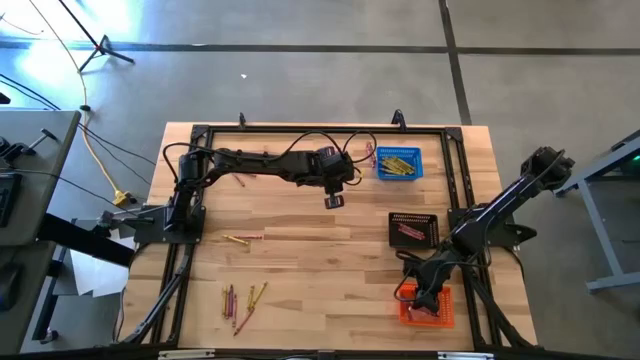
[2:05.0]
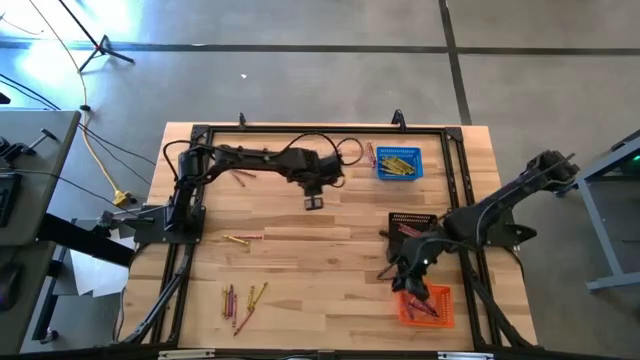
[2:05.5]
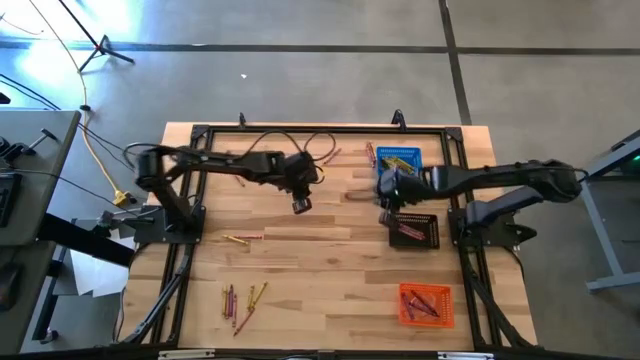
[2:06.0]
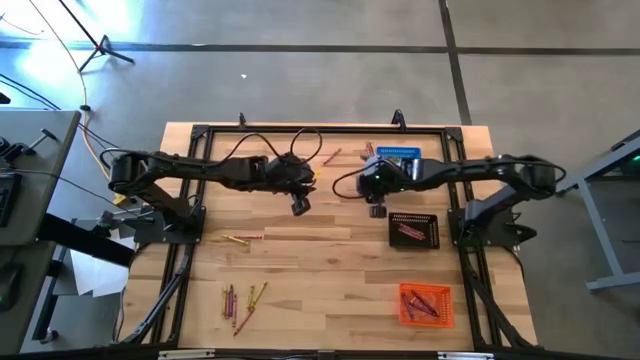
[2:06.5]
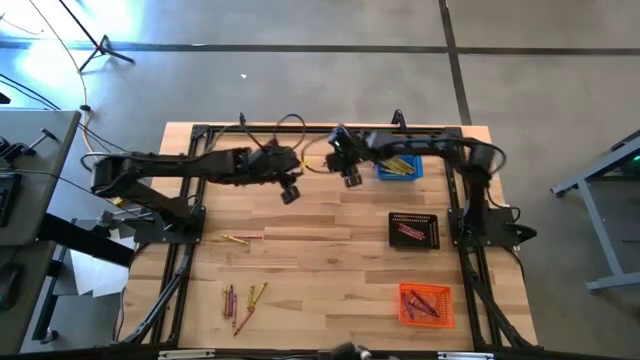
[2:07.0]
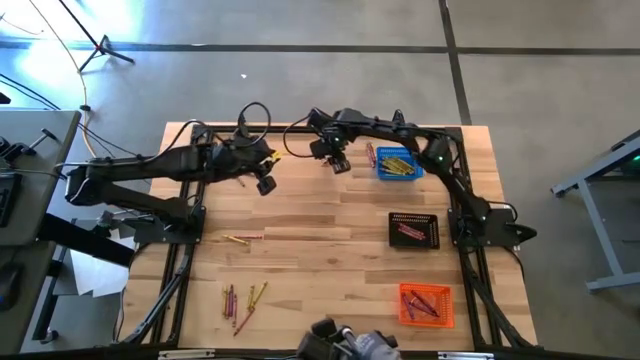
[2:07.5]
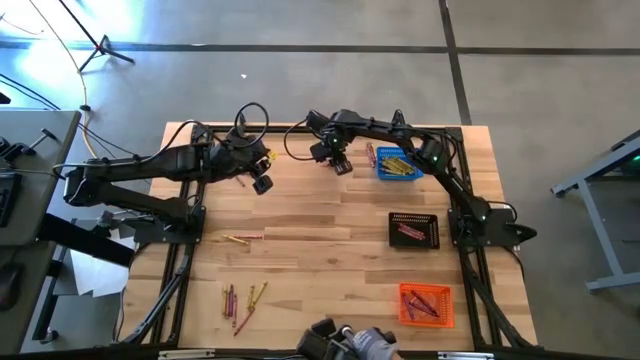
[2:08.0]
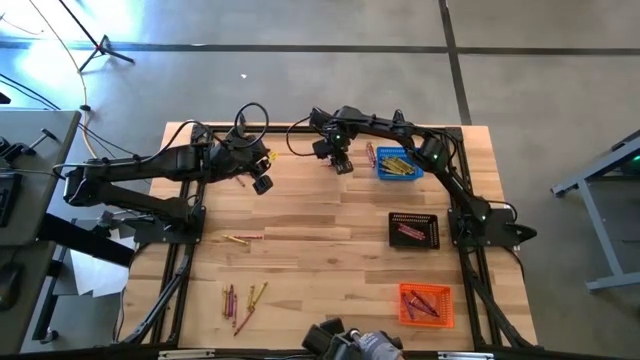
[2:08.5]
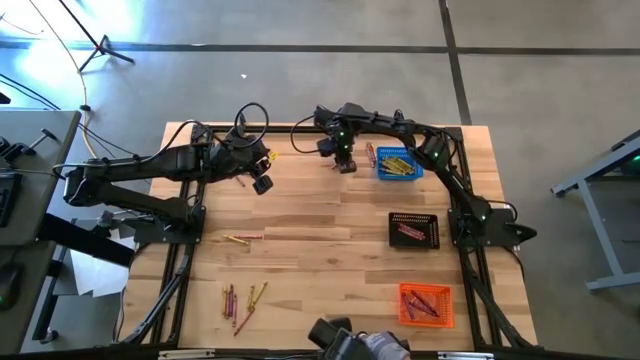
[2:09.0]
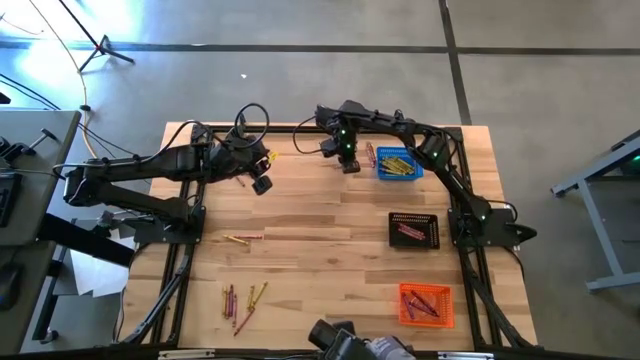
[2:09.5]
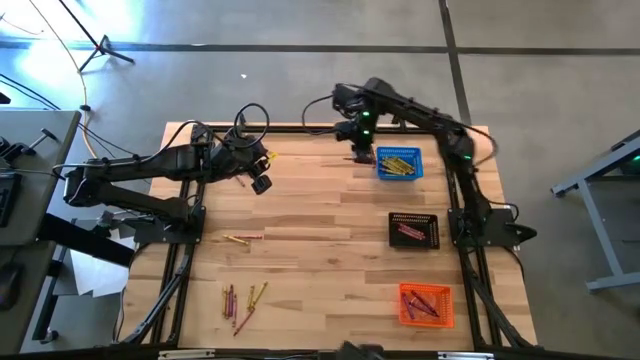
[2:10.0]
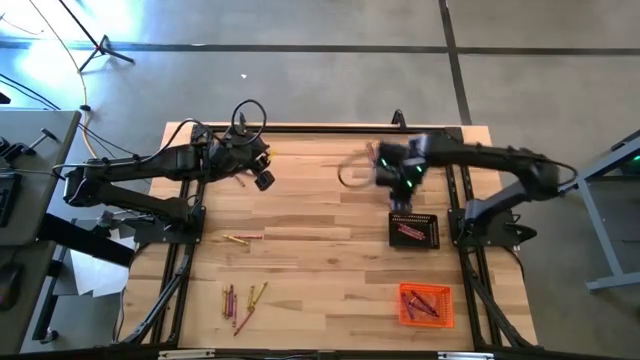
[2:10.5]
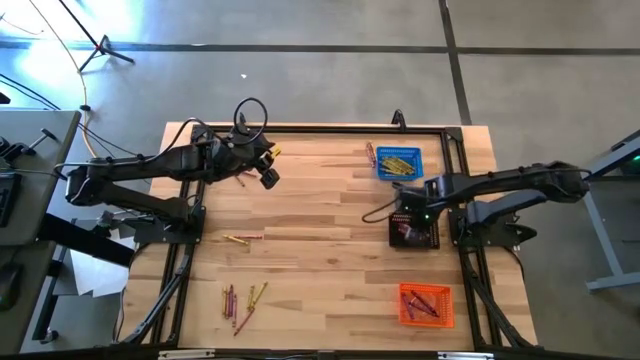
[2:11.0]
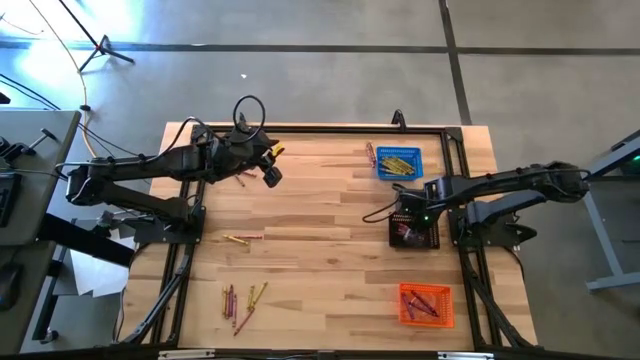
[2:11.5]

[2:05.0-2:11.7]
Task: Sort crayons
Put the red crayon into the black bin

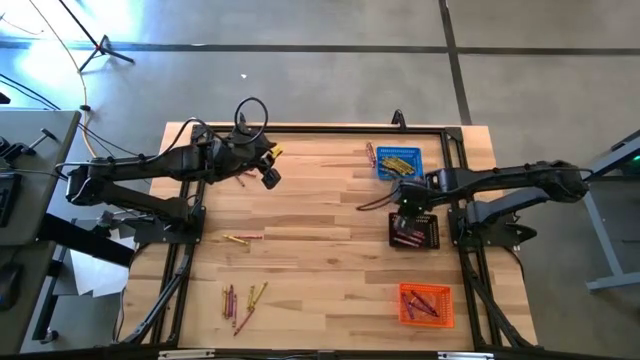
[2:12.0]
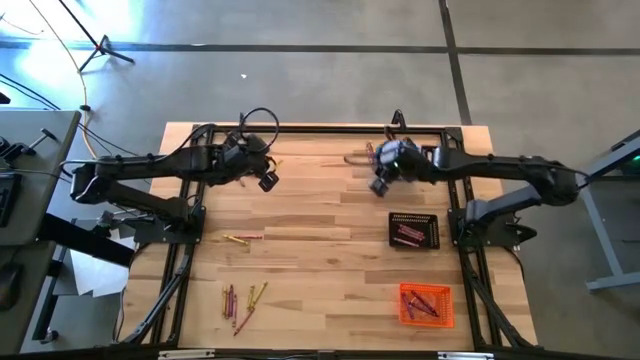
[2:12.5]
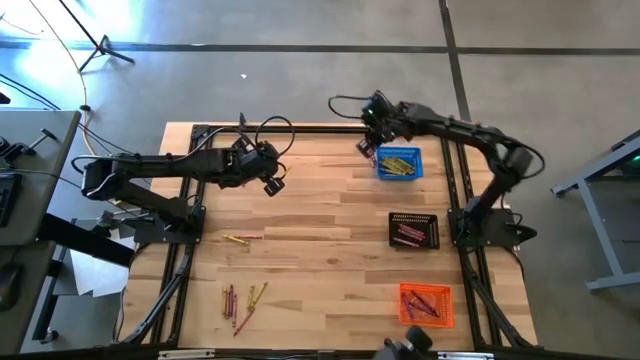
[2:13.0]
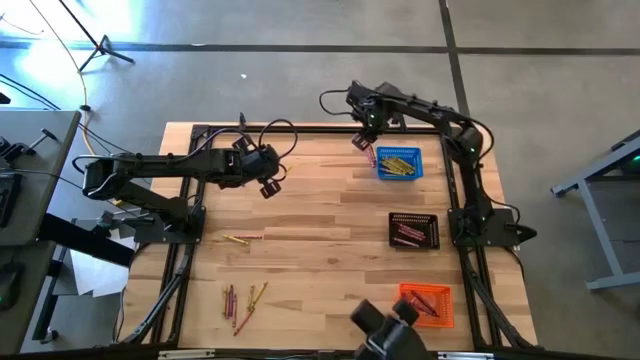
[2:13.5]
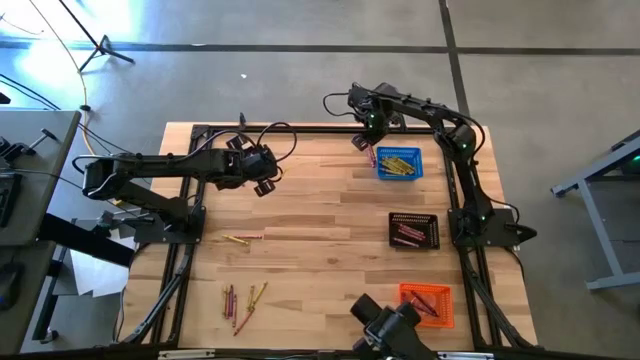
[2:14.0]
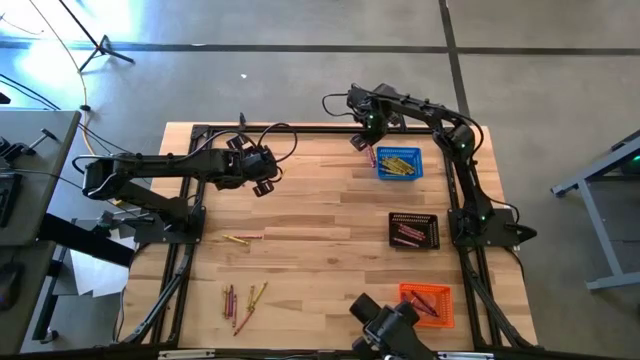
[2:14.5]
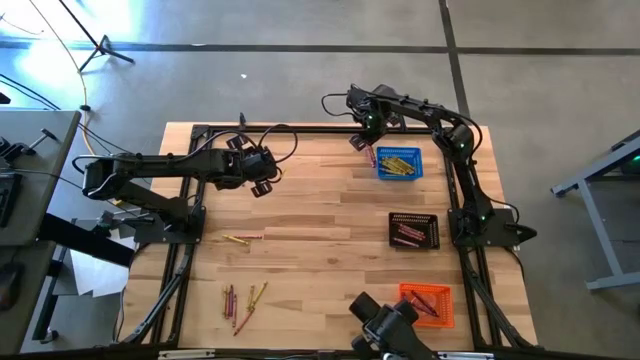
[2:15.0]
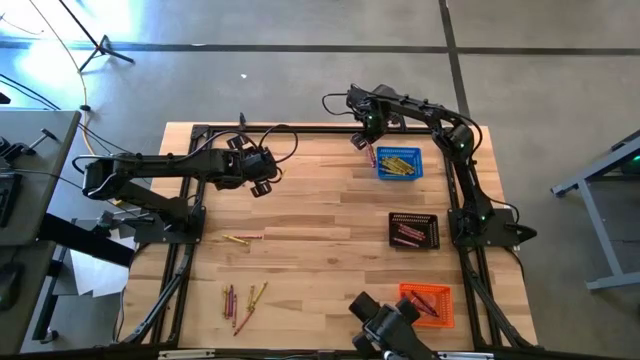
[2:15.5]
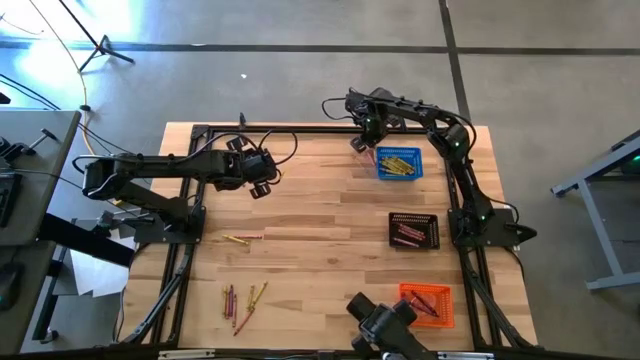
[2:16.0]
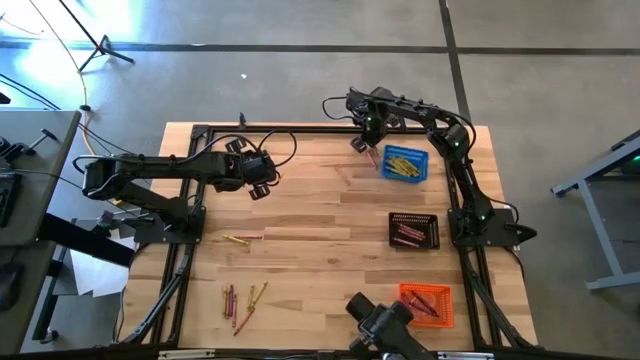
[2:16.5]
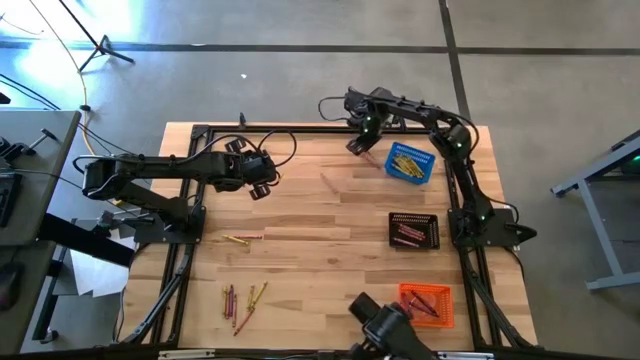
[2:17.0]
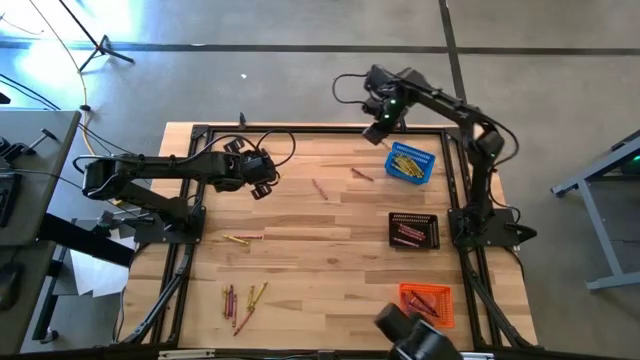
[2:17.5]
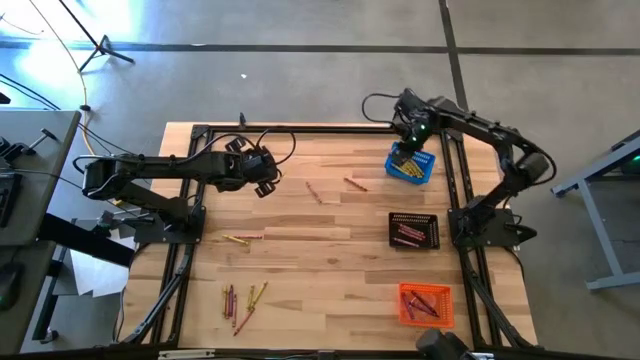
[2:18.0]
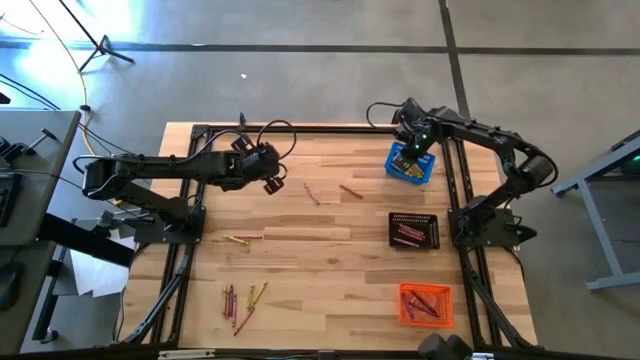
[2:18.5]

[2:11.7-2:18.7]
Put the yellow crayon into the blue bin

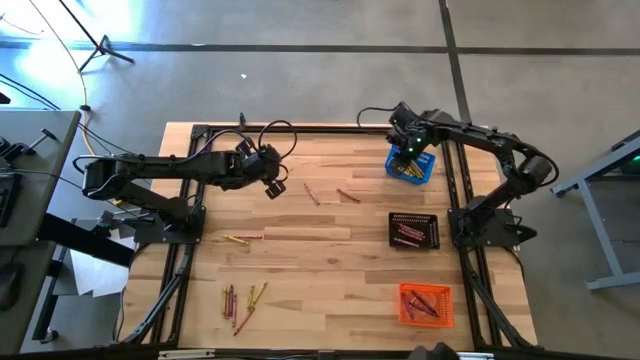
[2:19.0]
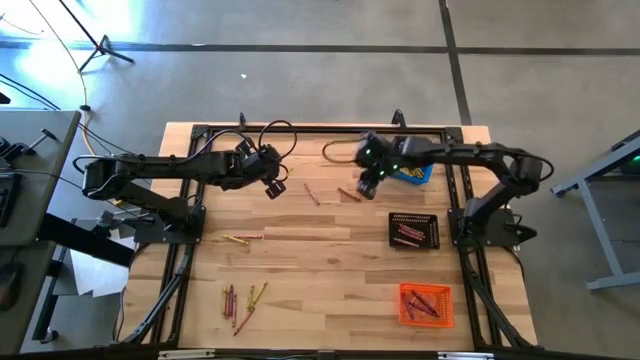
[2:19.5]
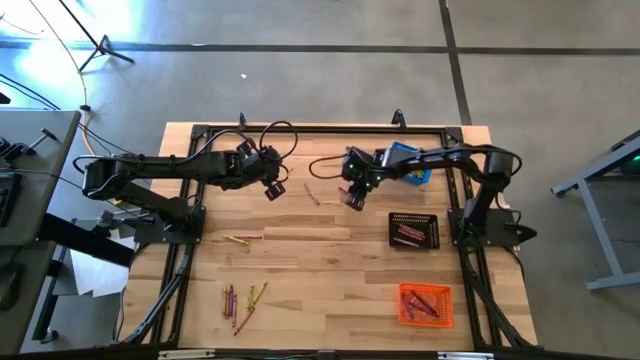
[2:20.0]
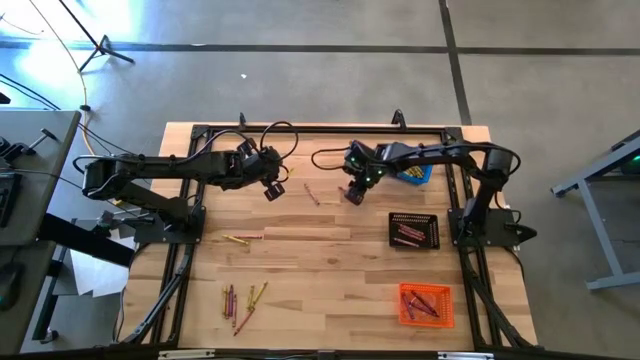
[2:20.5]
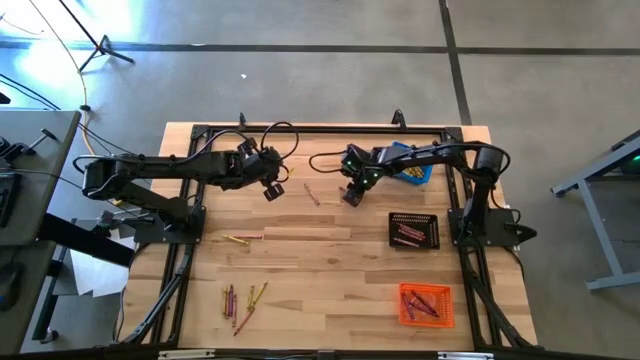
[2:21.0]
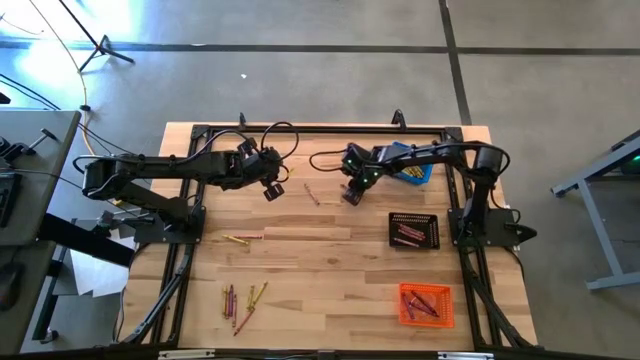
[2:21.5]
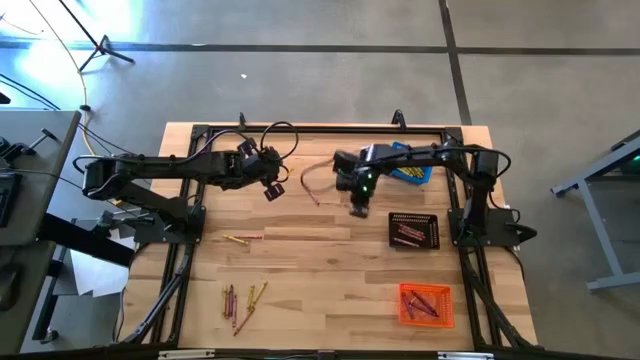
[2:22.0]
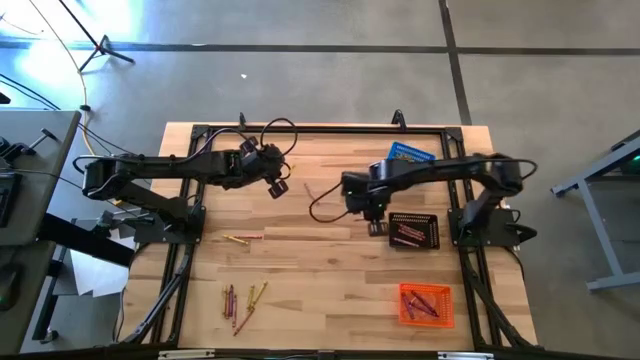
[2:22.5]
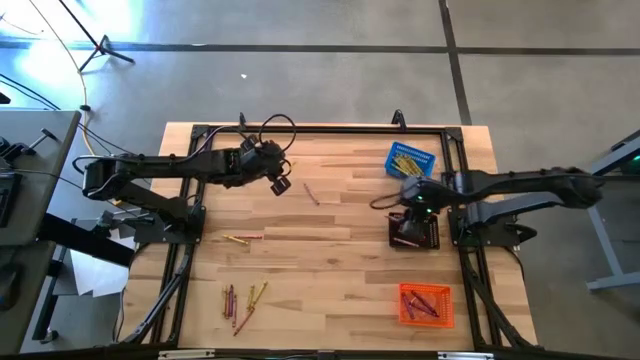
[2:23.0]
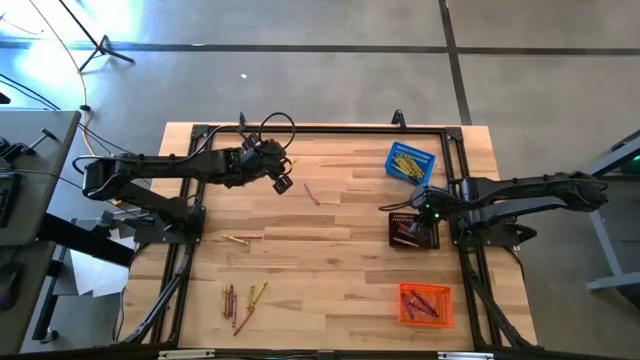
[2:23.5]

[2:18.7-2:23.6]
Put the red crayon into the black bin

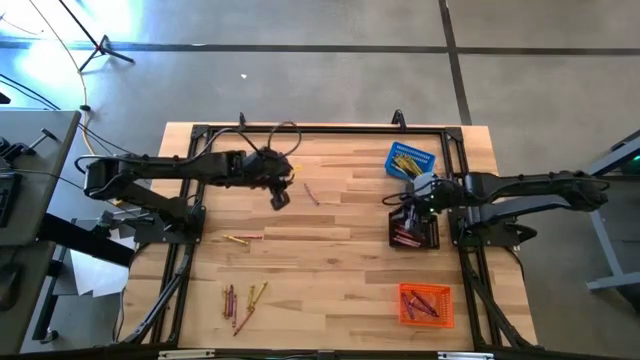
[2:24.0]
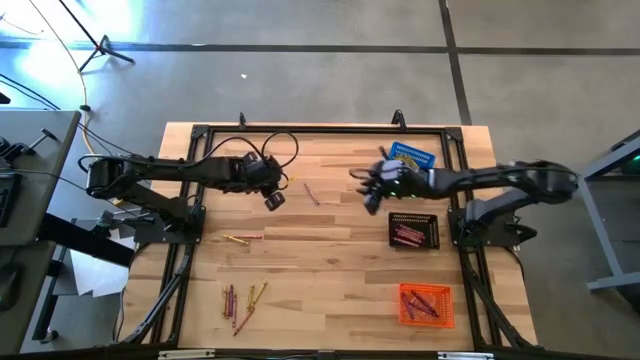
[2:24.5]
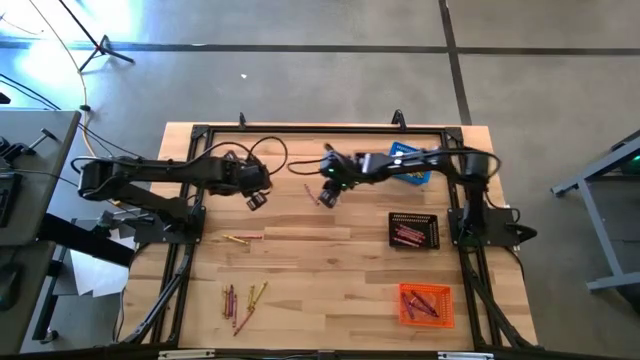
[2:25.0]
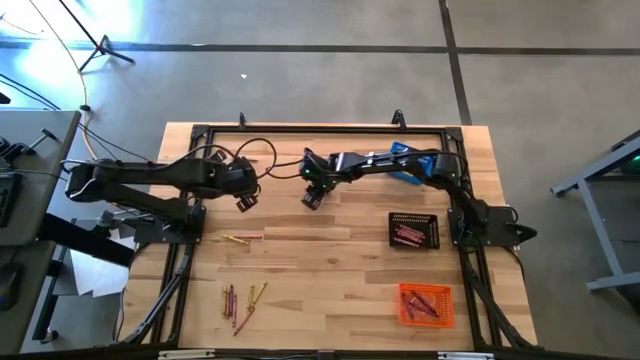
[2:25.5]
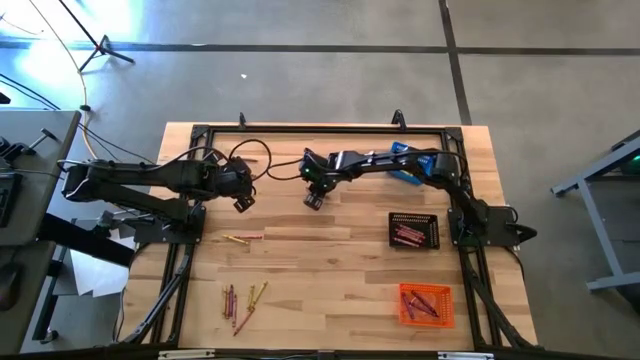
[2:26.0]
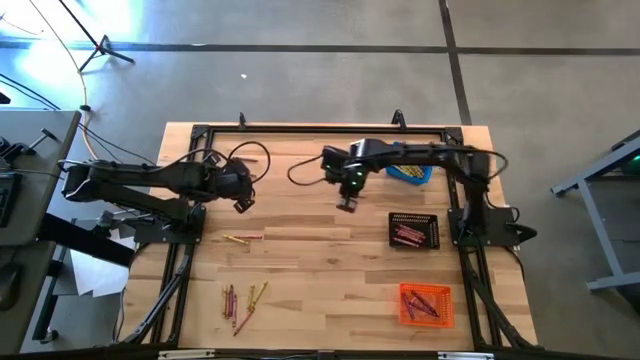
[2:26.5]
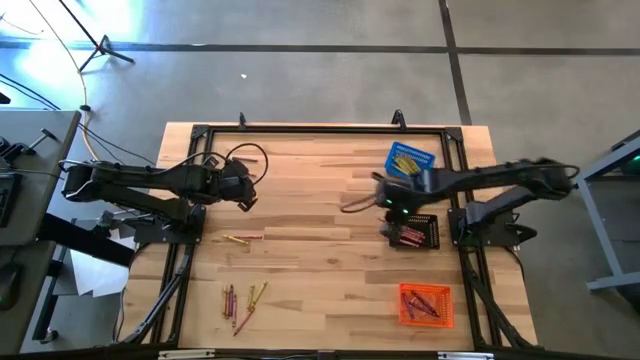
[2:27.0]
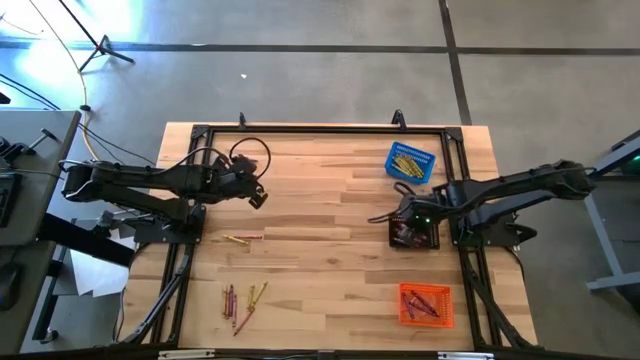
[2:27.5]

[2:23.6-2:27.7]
Put the red crayon into the black bin

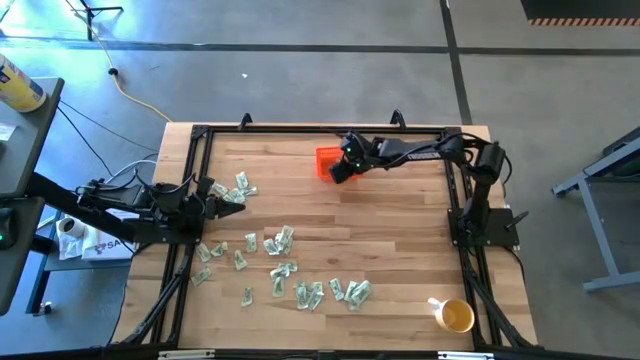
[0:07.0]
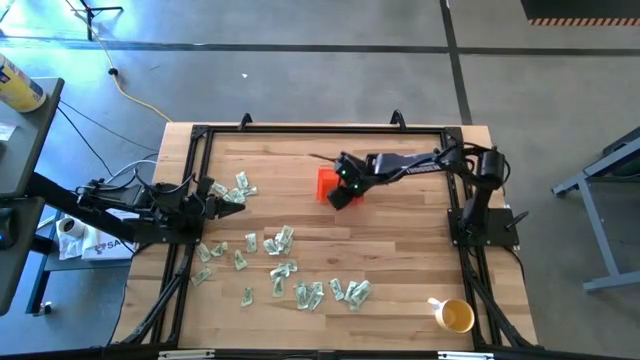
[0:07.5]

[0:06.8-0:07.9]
Task: Pick and place Stevia / Truvia into bins
Adjust the orange basket
